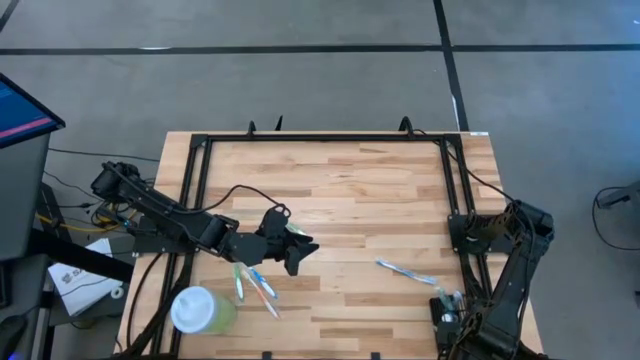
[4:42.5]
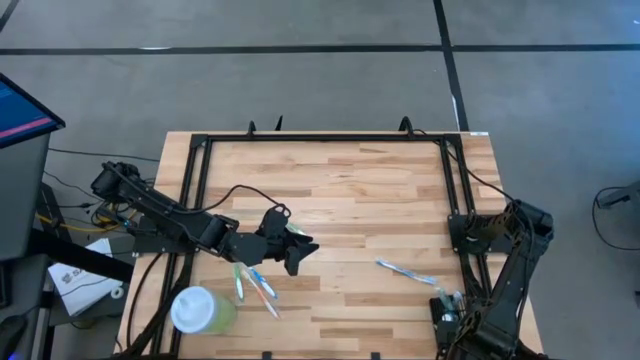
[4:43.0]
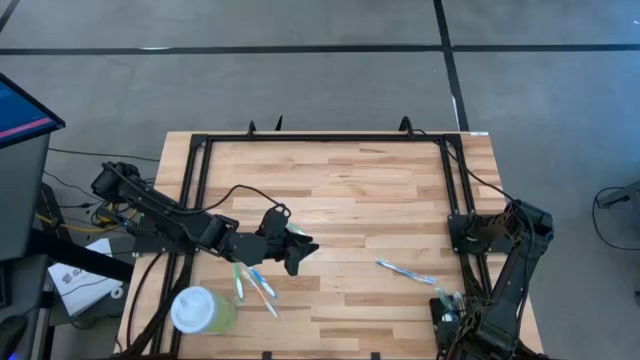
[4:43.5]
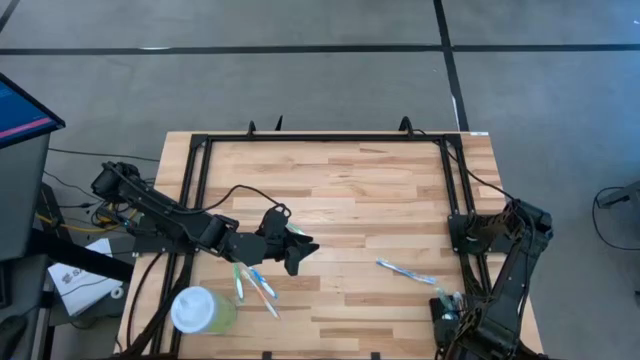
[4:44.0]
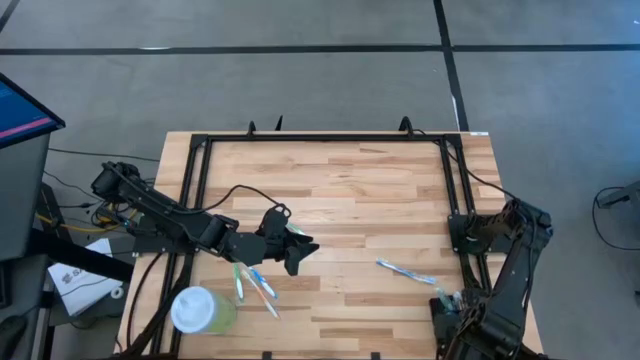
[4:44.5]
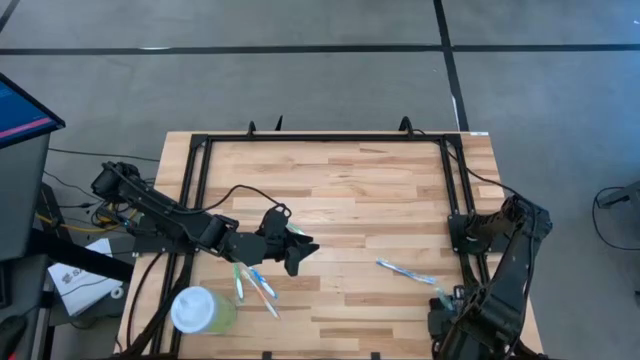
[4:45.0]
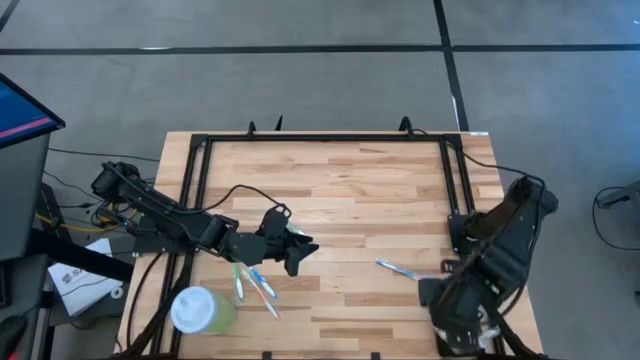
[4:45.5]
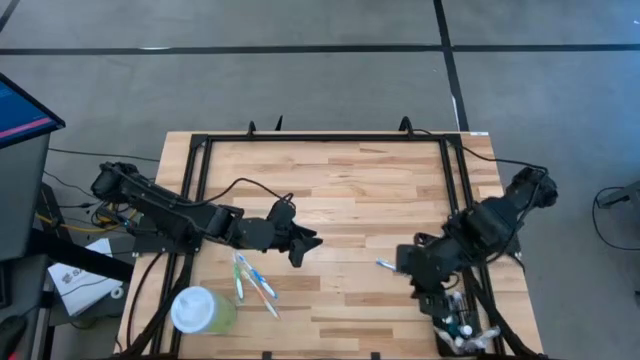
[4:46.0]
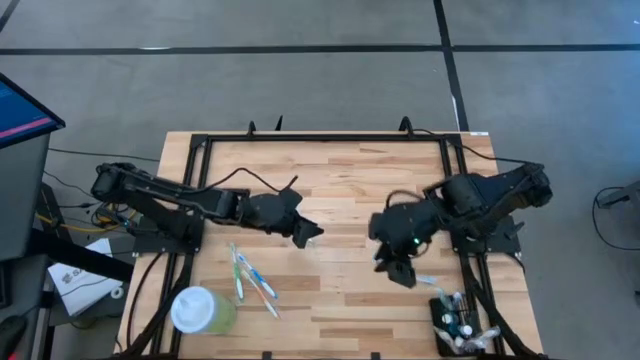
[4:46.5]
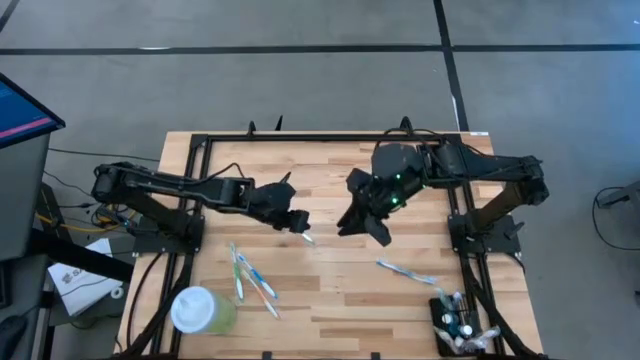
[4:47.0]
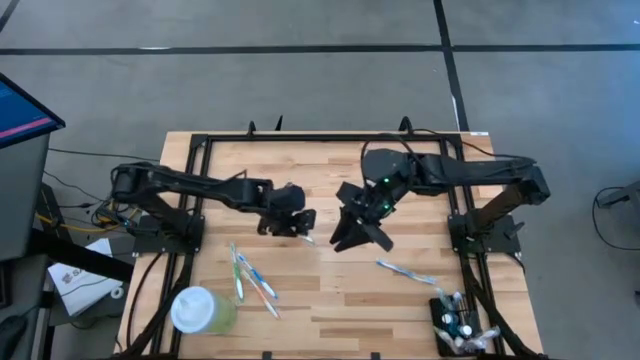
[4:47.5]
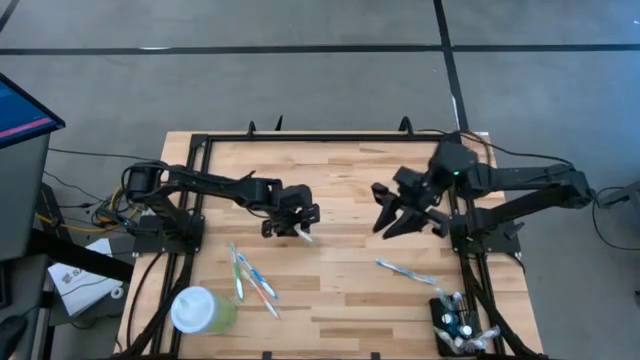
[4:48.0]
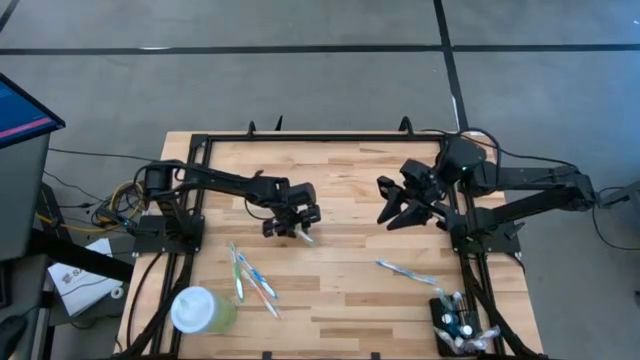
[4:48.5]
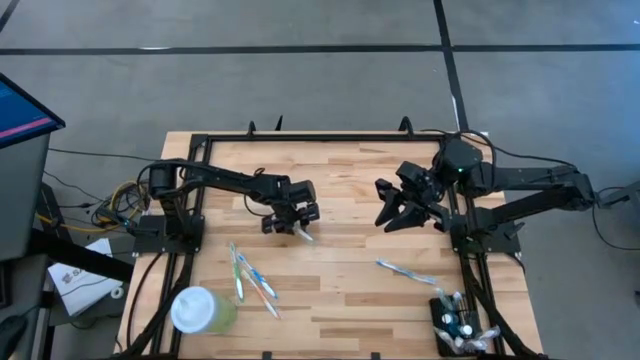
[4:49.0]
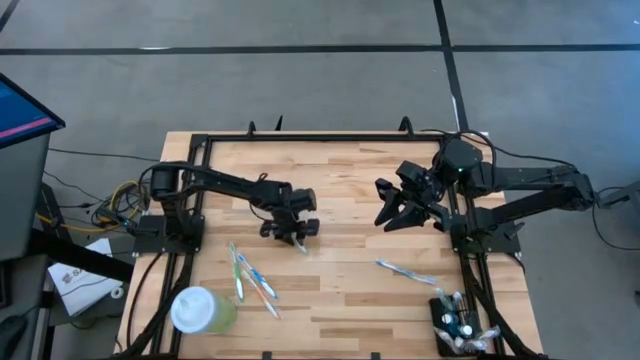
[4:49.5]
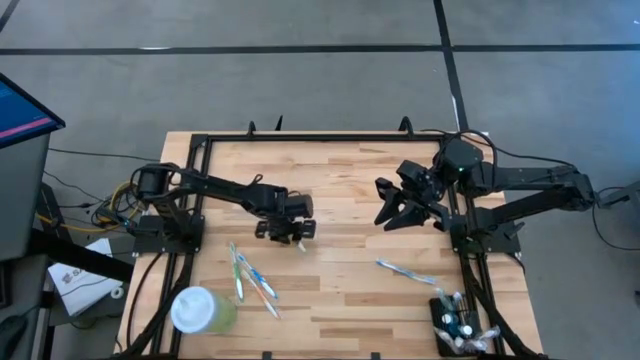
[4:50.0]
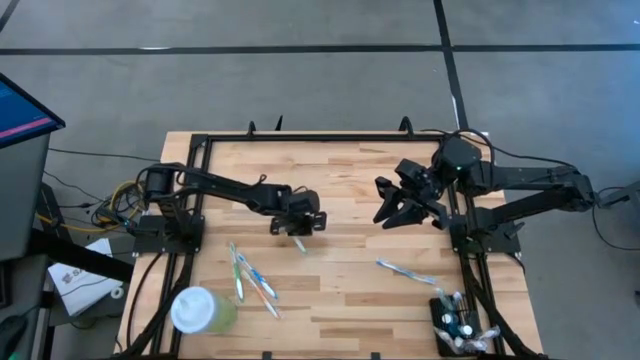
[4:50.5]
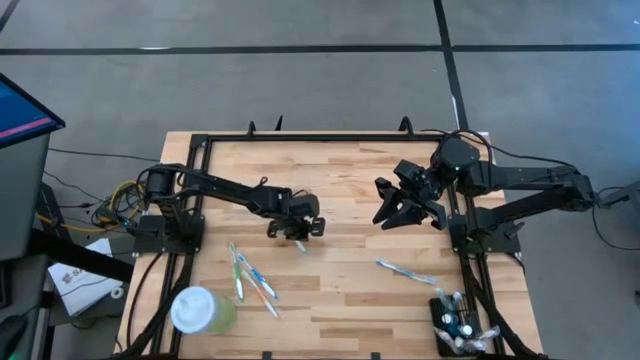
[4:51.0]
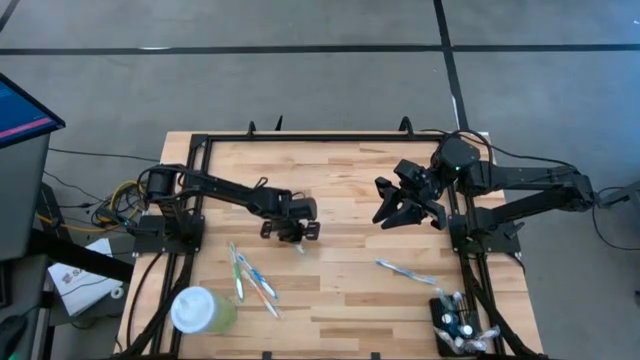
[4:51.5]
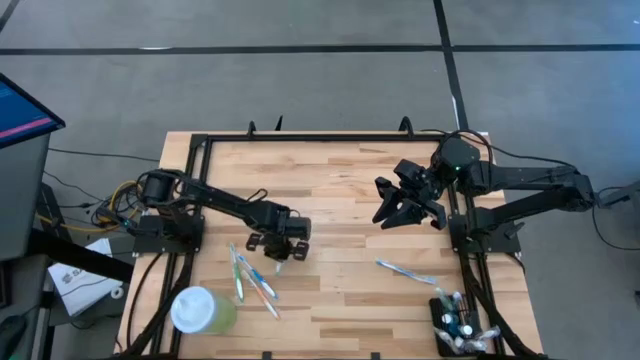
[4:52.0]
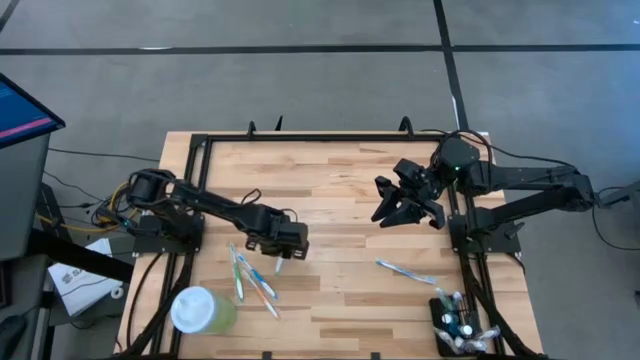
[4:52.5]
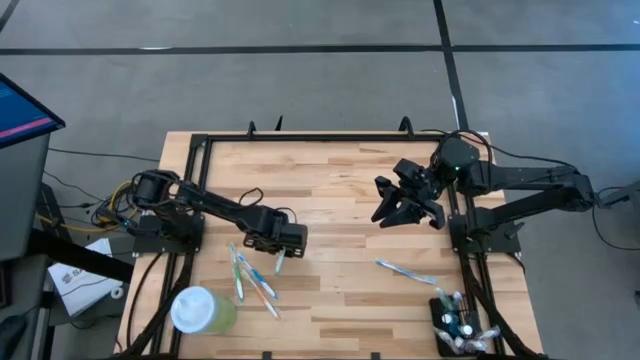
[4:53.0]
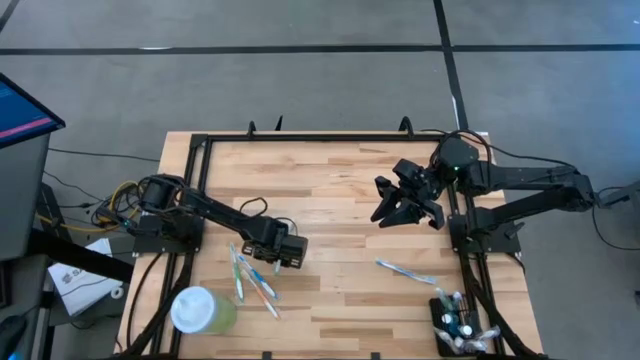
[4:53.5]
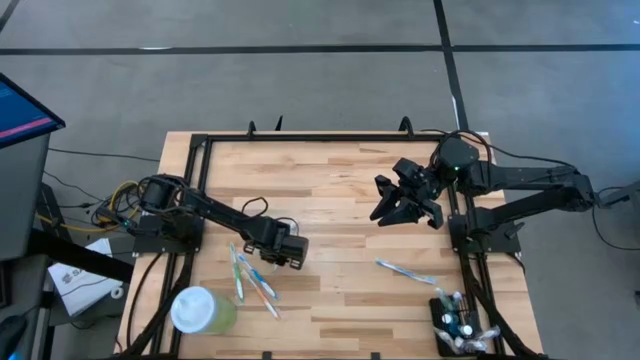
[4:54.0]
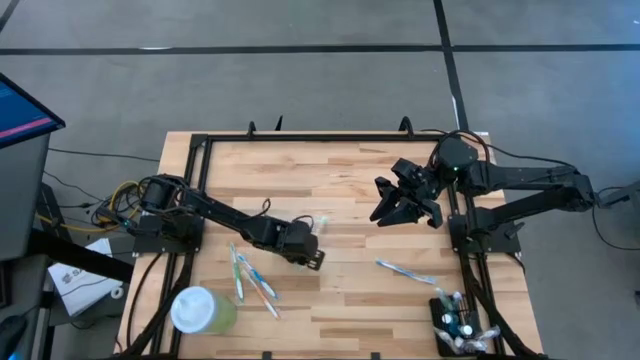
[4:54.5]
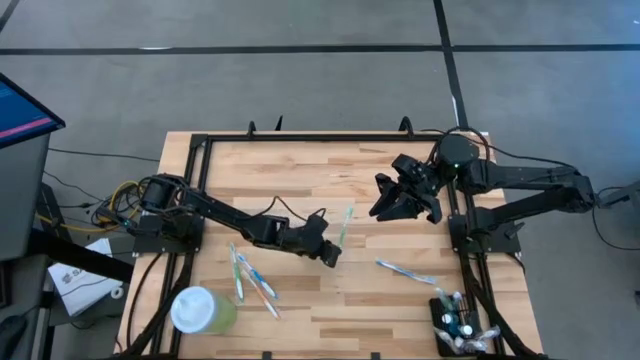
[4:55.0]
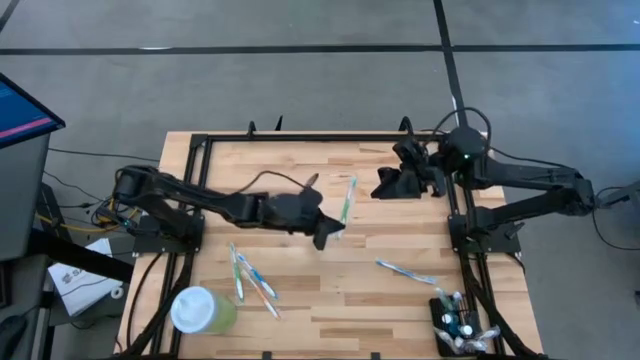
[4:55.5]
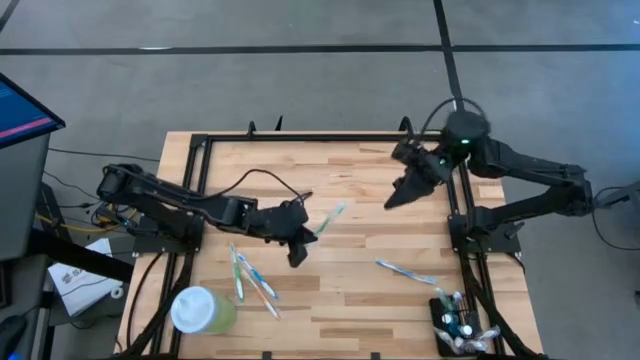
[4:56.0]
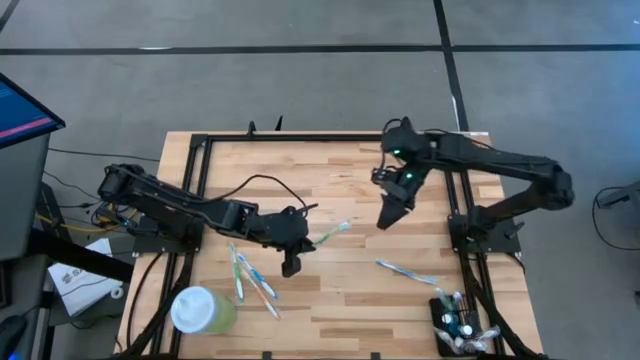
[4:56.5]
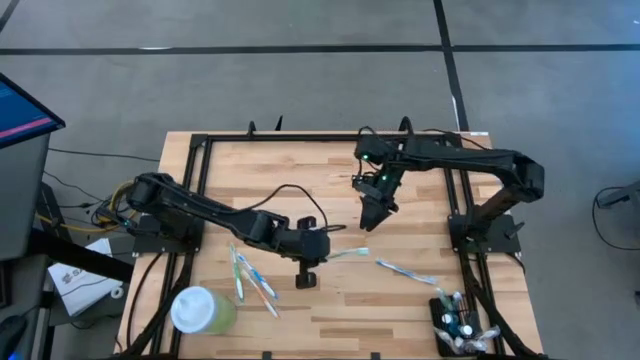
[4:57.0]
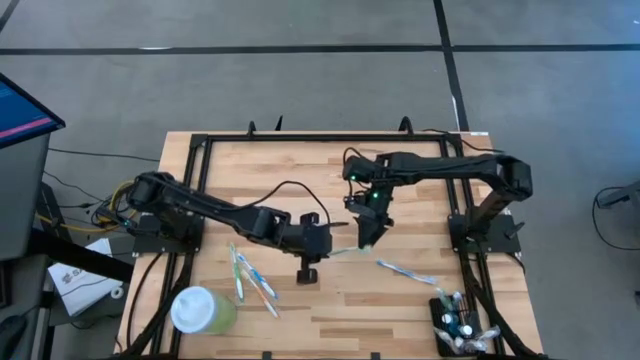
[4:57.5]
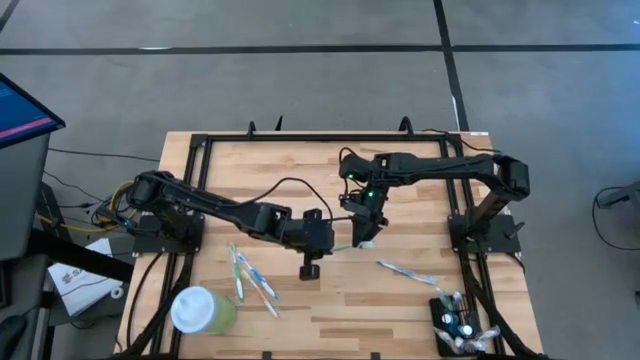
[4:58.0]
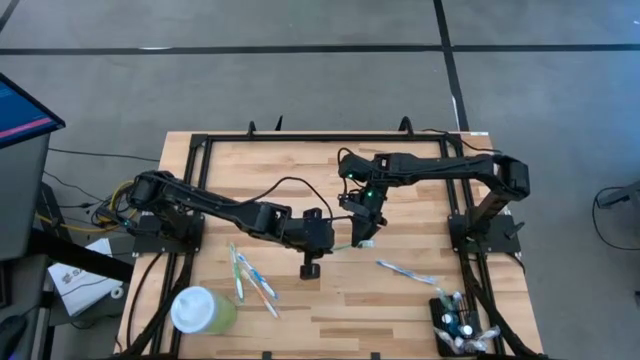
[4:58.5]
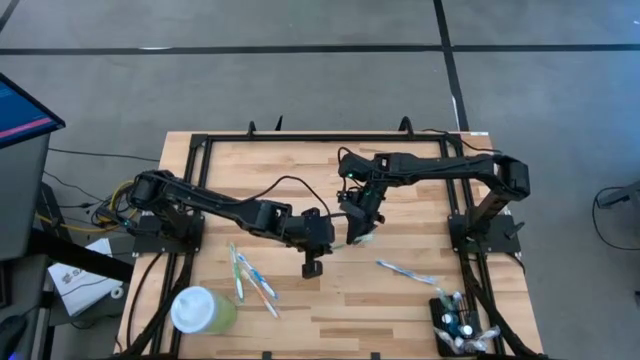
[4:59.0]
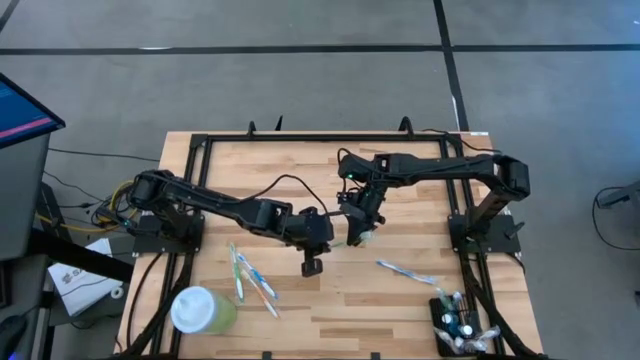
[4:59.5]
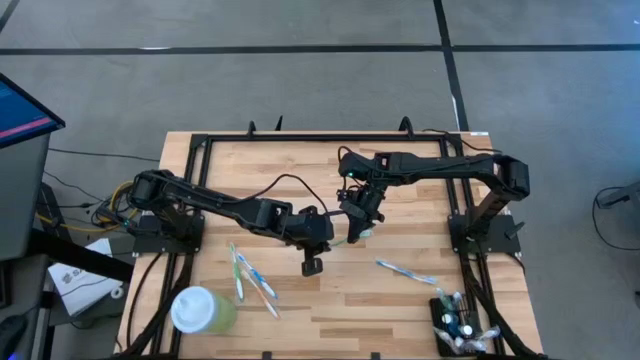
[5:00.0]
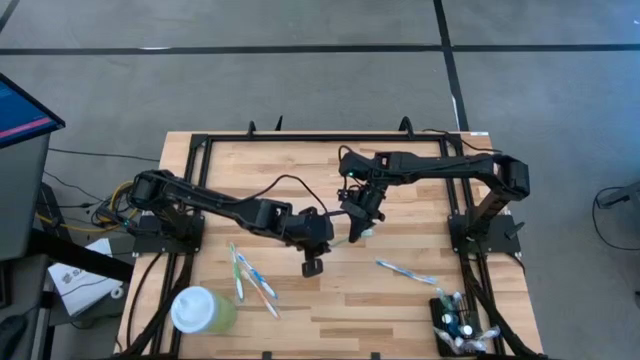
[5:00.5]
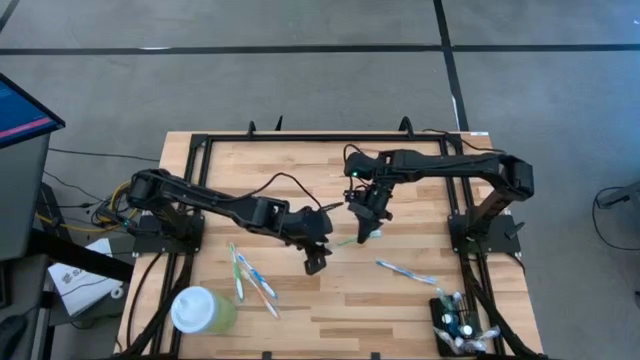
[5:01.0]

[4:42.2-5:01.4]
Task: Pick & Place toothbrushing station
Put the top green toothbrush into the black organizer

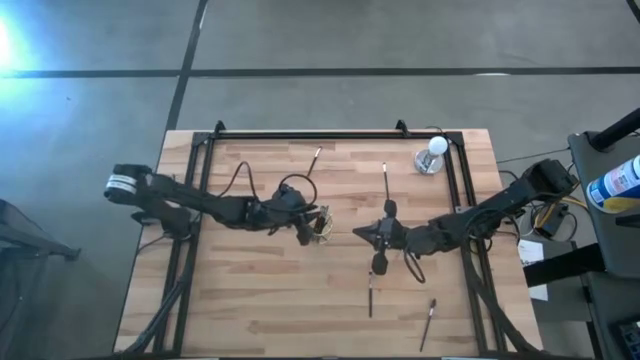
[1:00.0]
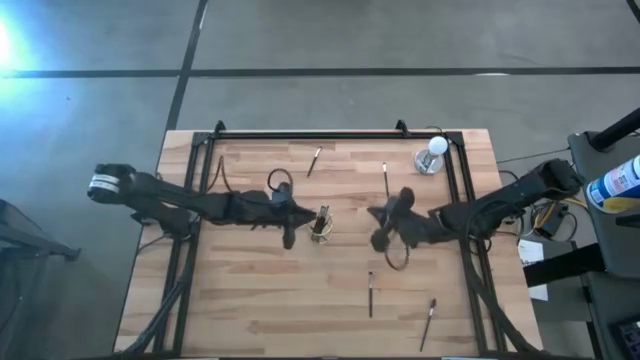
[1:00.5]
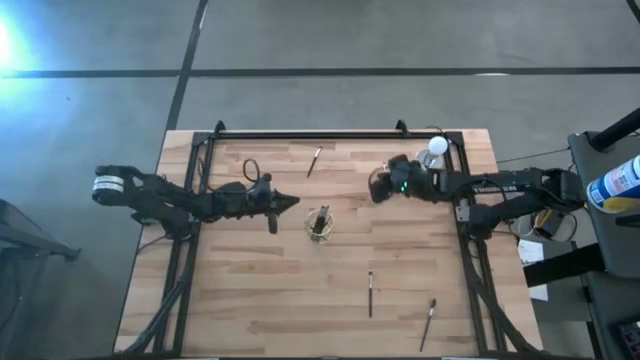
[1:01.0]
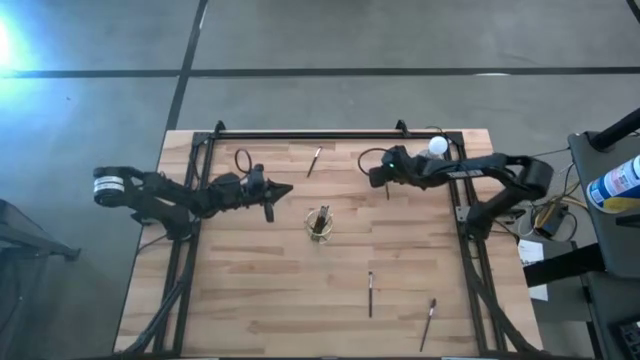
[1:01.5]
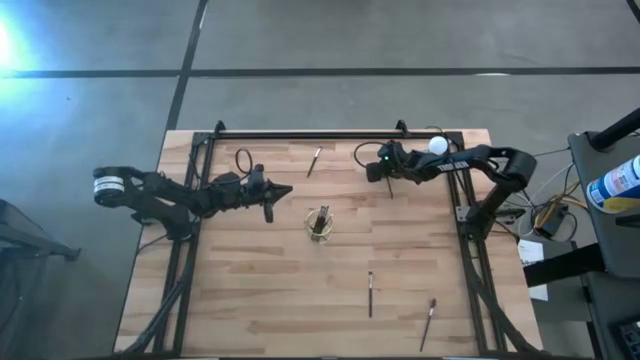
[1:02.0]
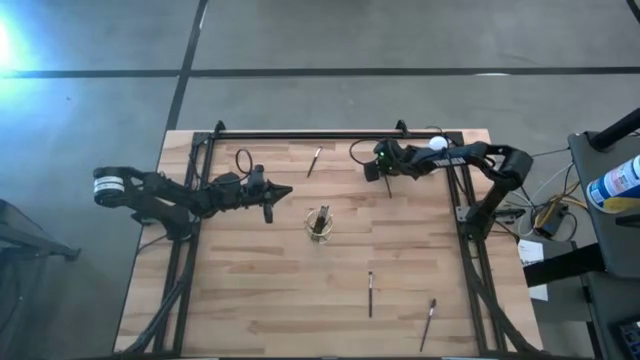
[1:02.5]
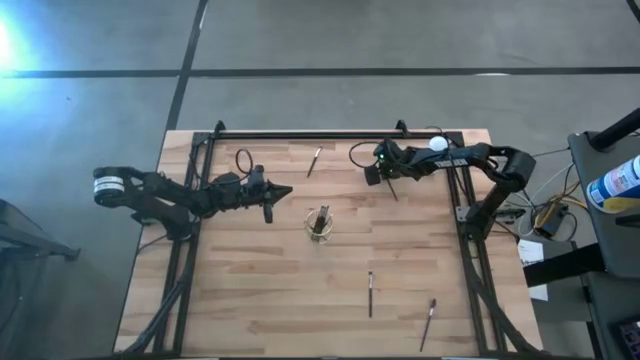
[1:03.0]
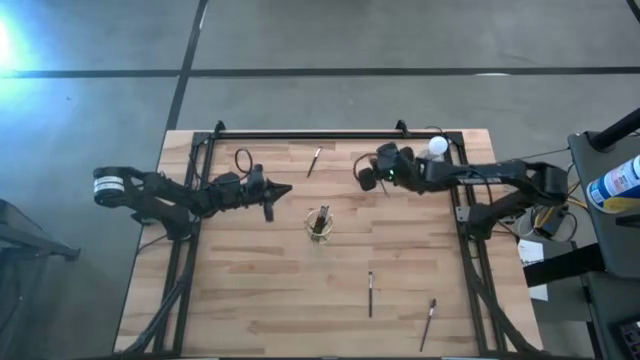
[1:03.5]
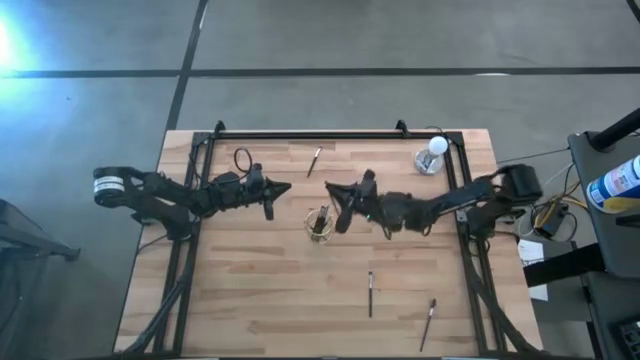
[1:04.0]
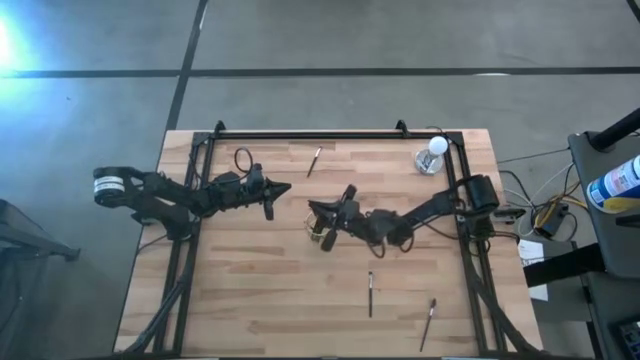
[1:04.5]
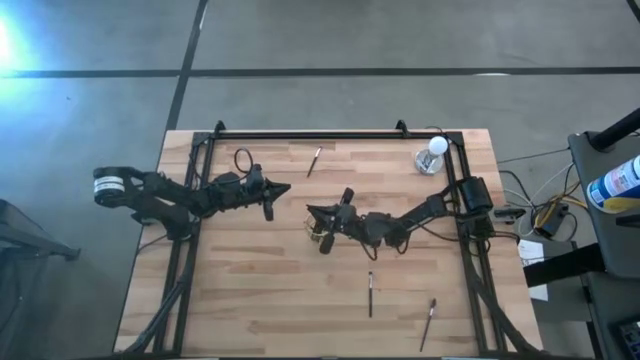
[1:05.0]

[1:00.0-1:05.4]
Task: Pick & Place Makeup Brushes
Put the eyeshadow brush into the gold makeup brush holder
